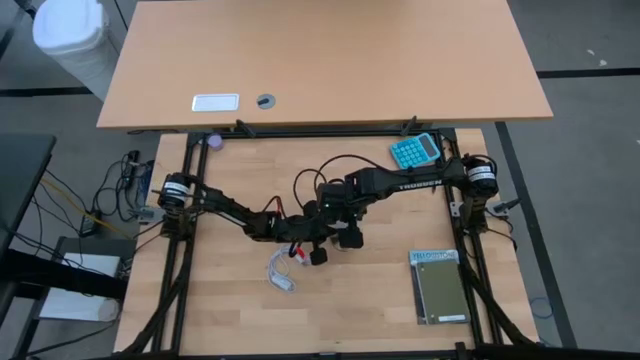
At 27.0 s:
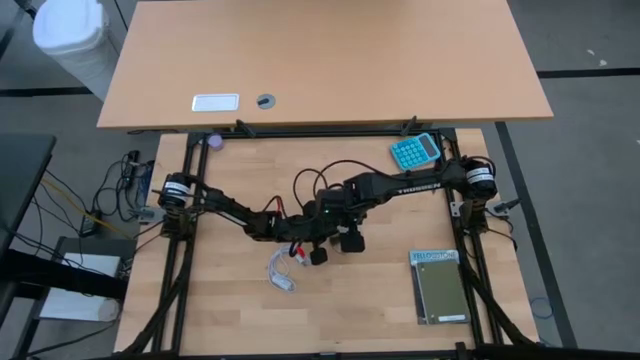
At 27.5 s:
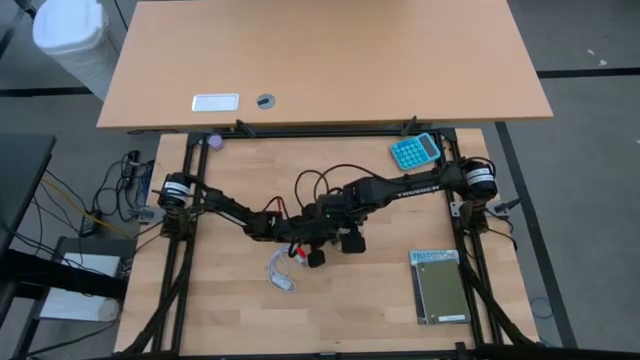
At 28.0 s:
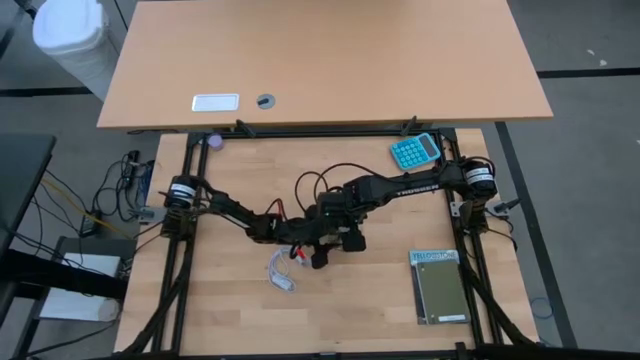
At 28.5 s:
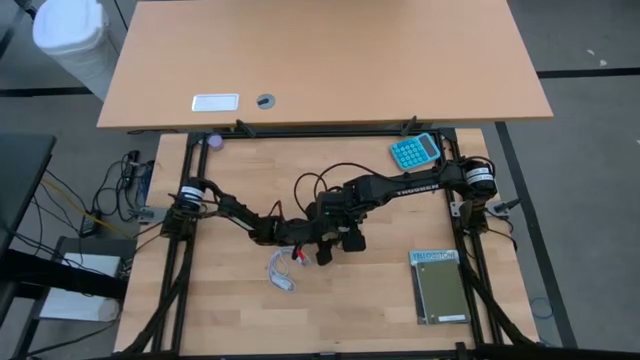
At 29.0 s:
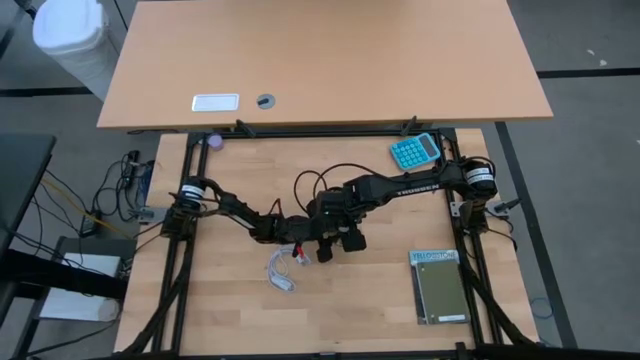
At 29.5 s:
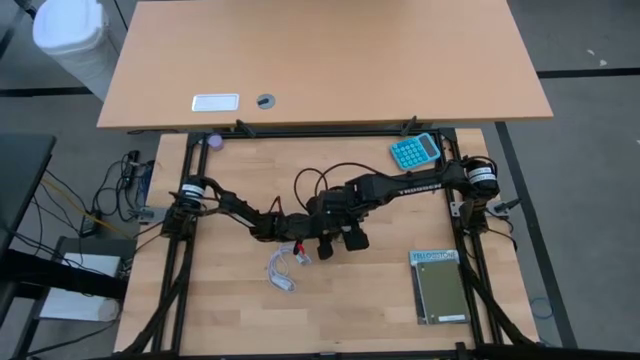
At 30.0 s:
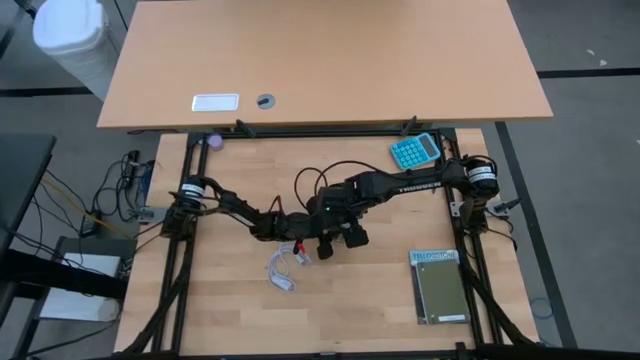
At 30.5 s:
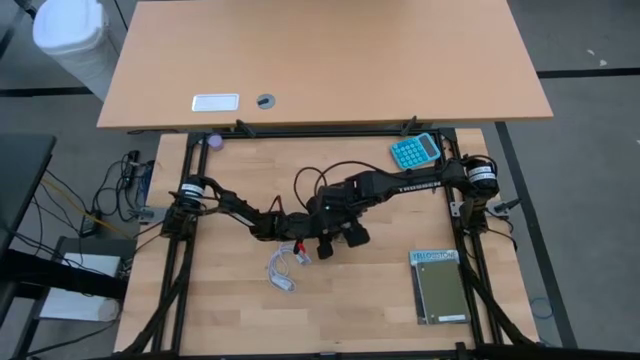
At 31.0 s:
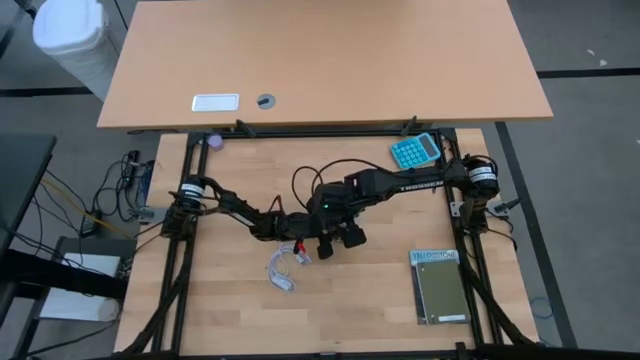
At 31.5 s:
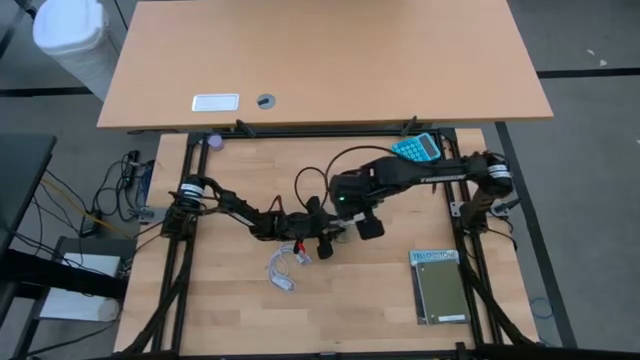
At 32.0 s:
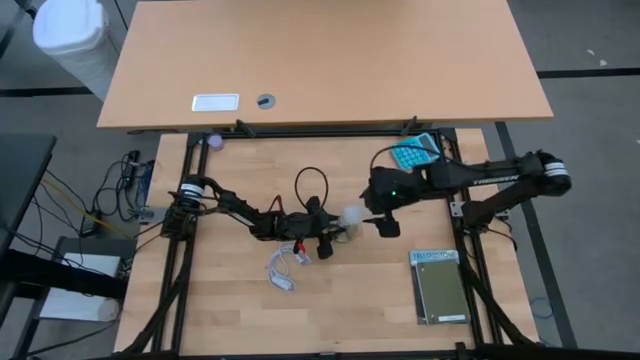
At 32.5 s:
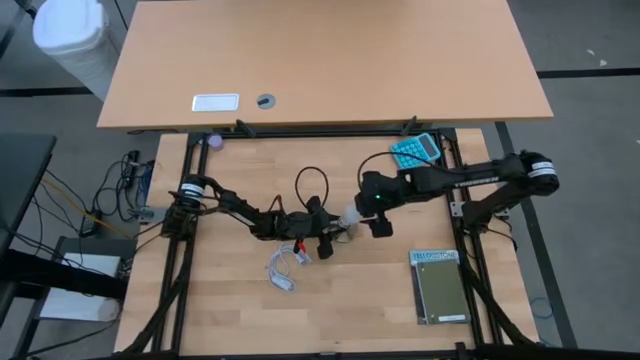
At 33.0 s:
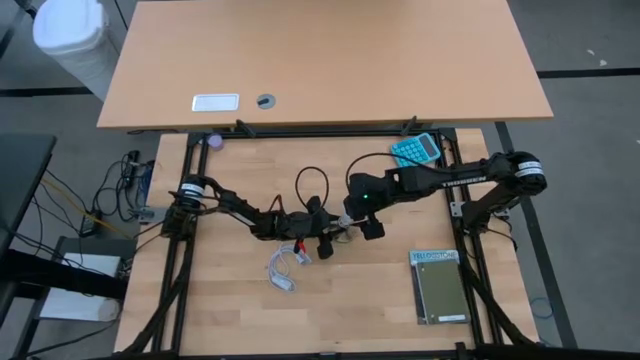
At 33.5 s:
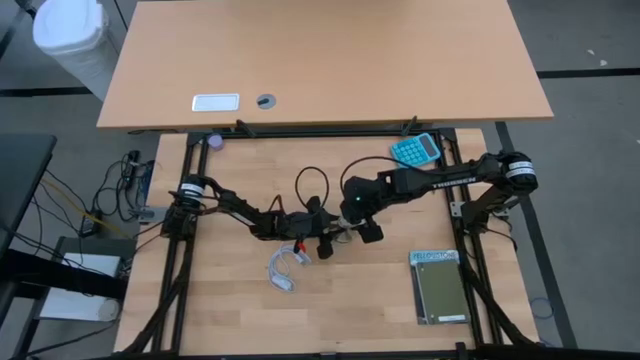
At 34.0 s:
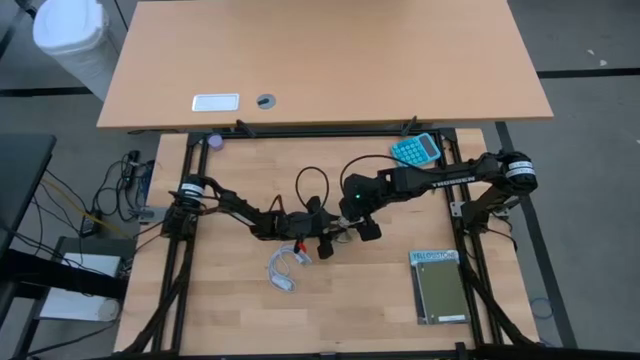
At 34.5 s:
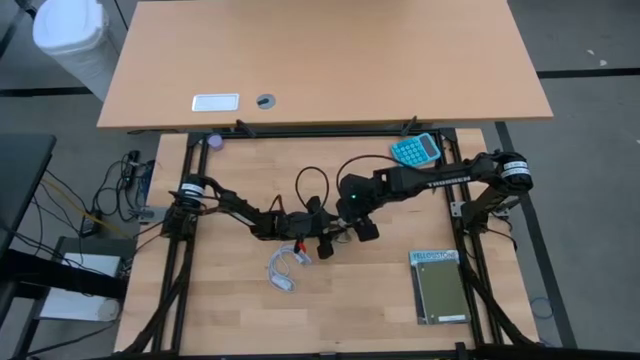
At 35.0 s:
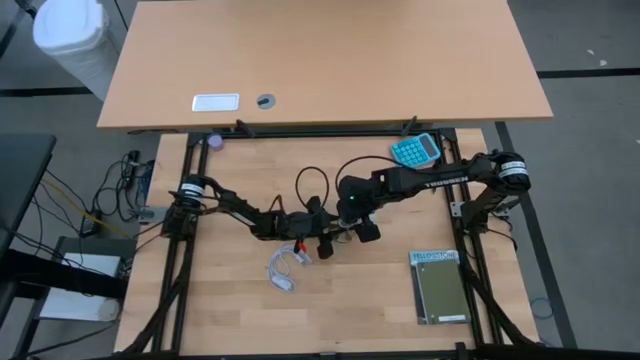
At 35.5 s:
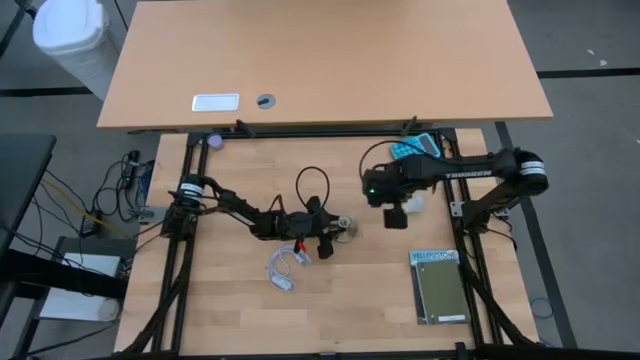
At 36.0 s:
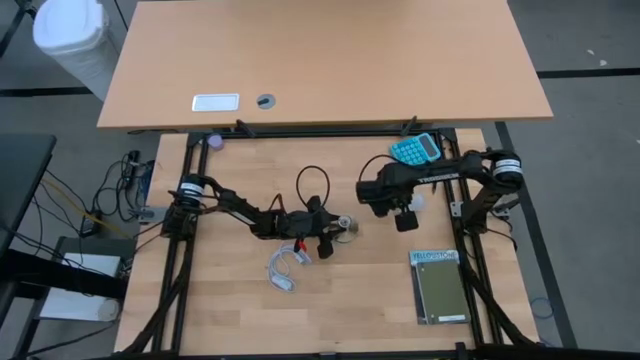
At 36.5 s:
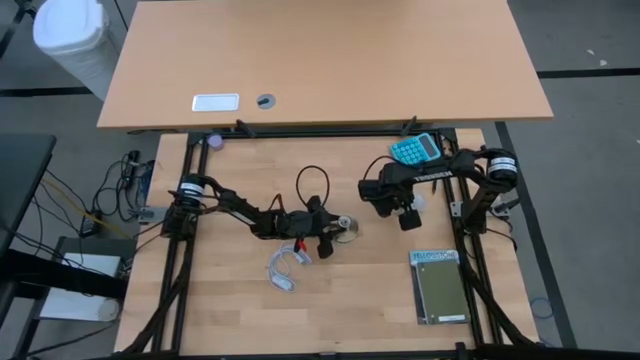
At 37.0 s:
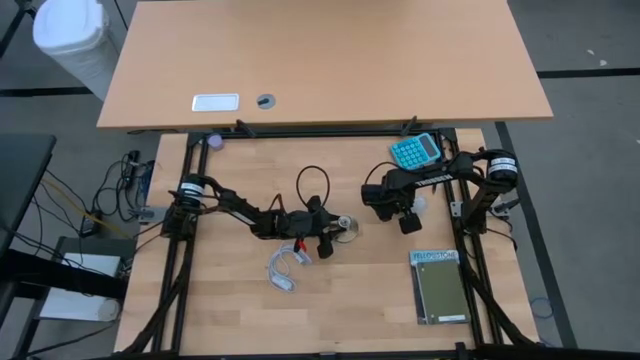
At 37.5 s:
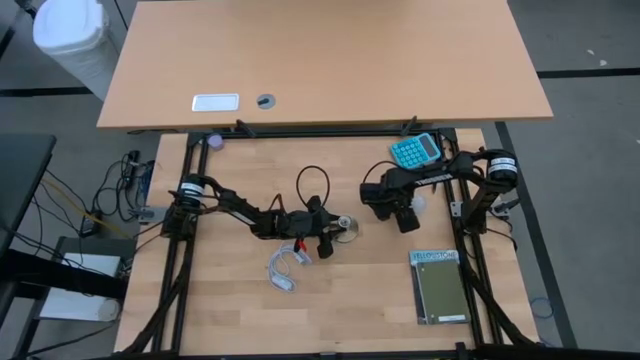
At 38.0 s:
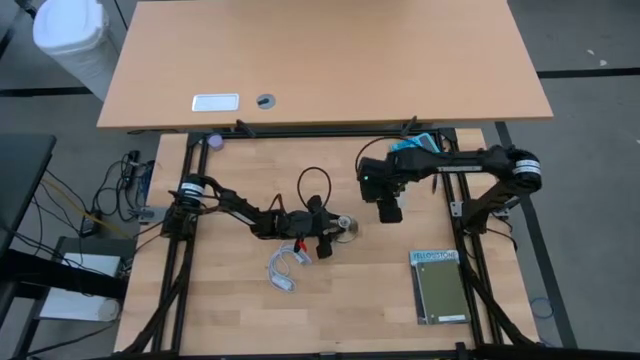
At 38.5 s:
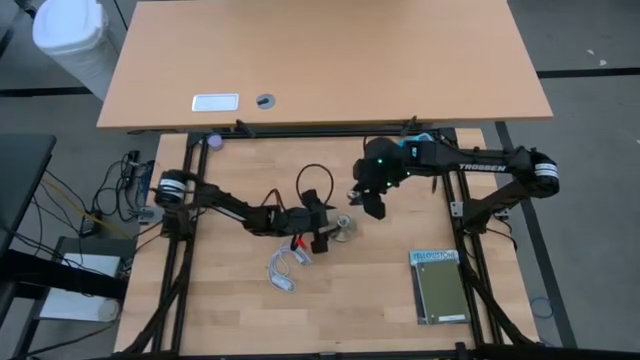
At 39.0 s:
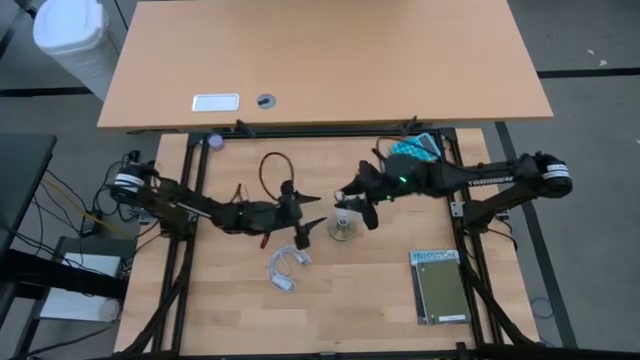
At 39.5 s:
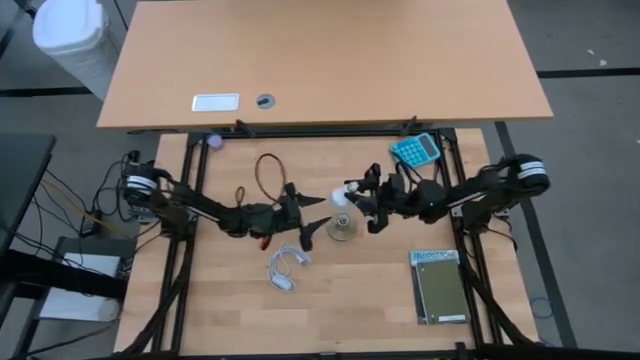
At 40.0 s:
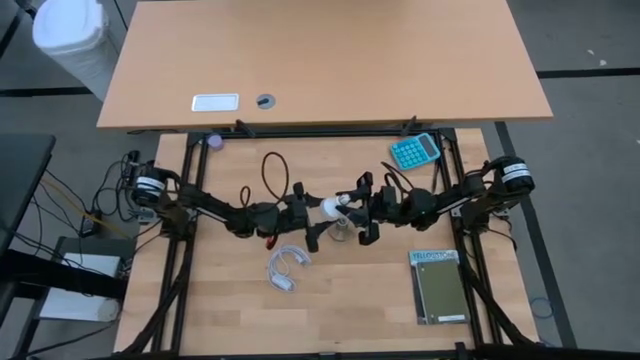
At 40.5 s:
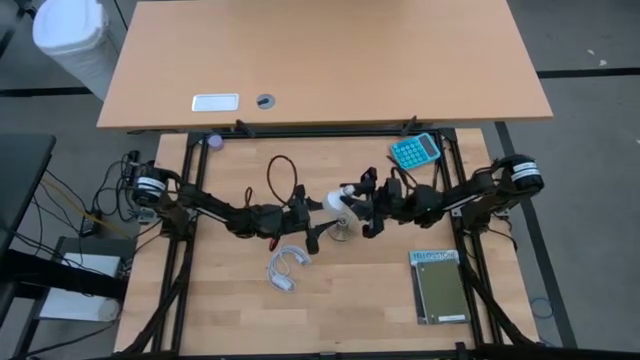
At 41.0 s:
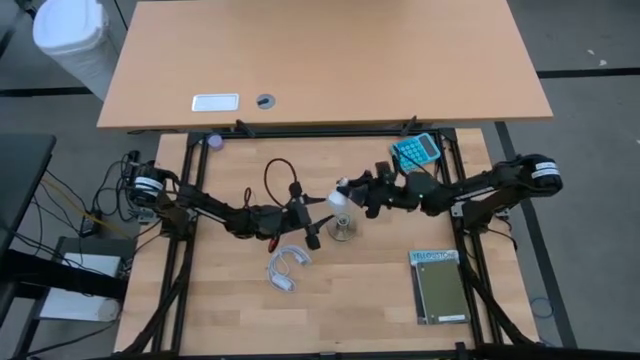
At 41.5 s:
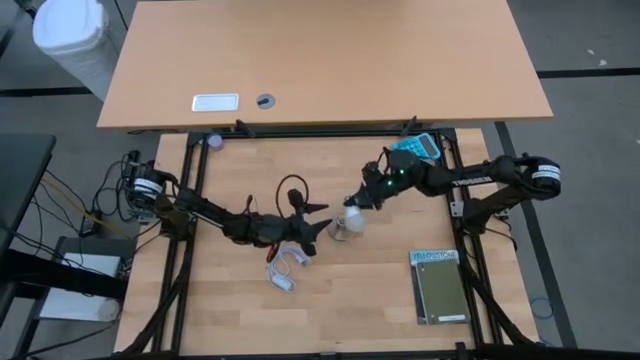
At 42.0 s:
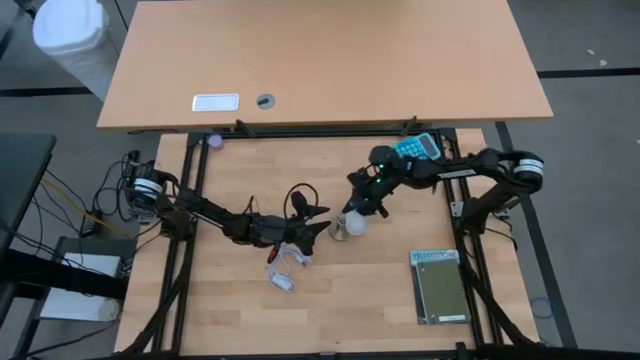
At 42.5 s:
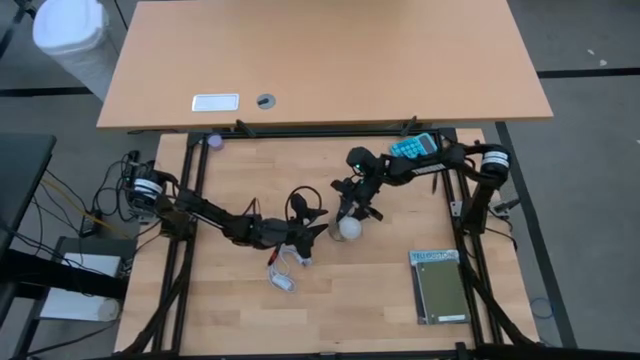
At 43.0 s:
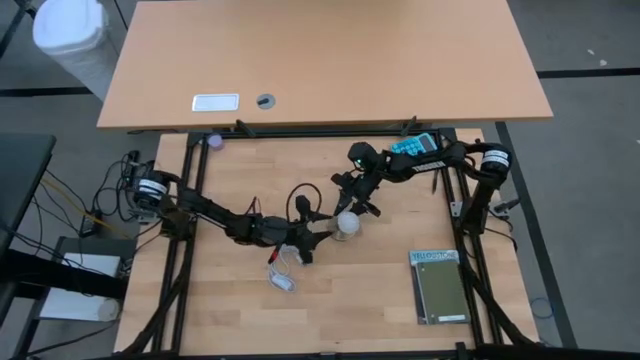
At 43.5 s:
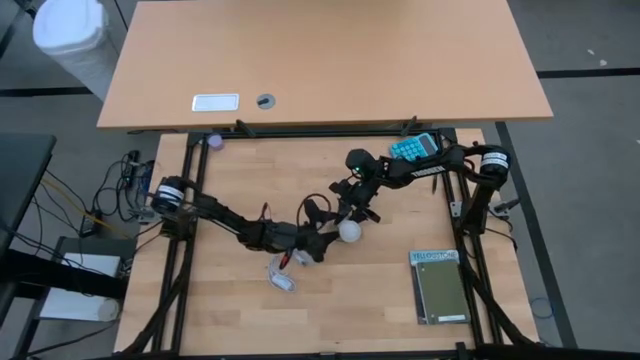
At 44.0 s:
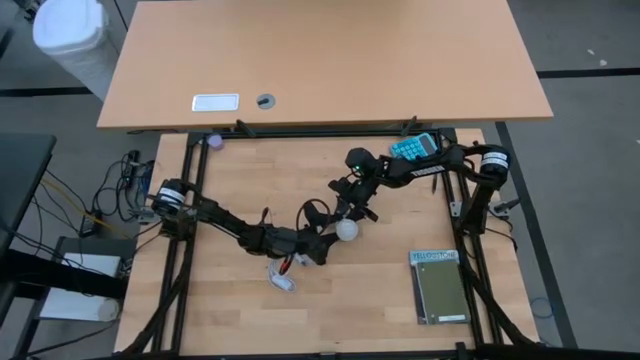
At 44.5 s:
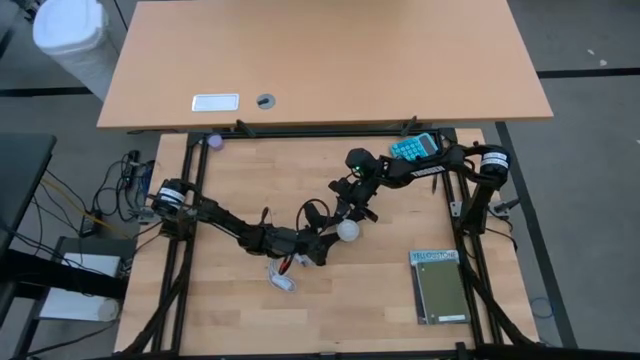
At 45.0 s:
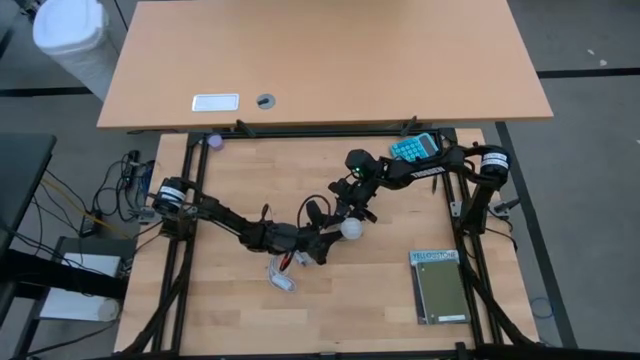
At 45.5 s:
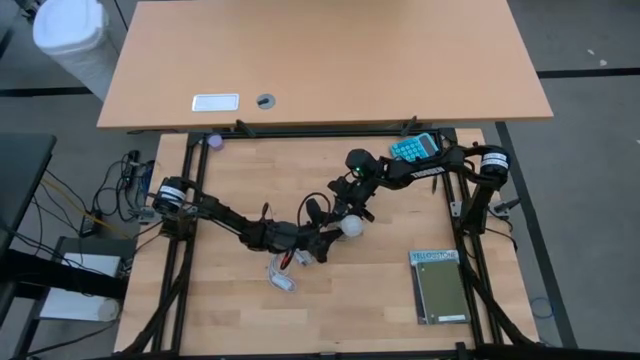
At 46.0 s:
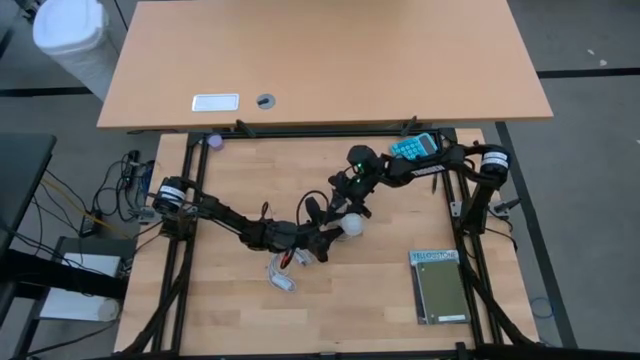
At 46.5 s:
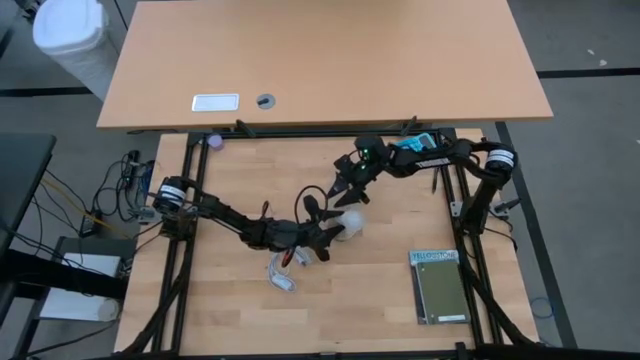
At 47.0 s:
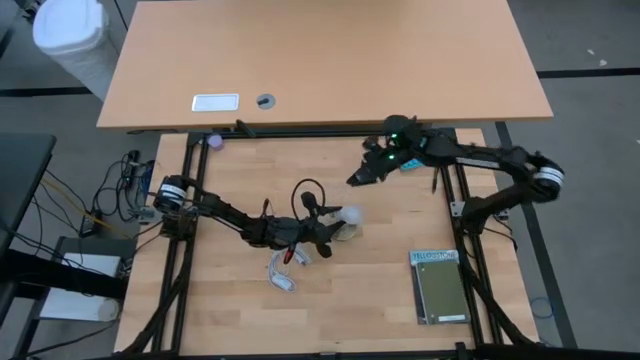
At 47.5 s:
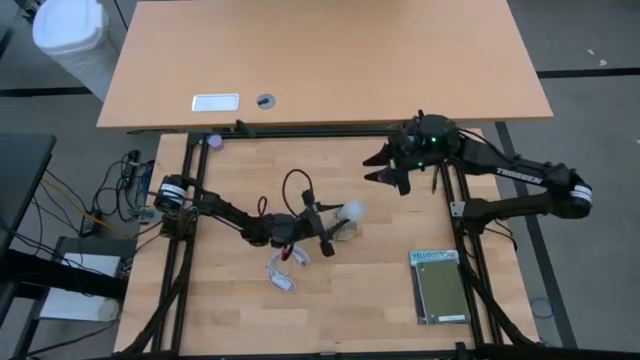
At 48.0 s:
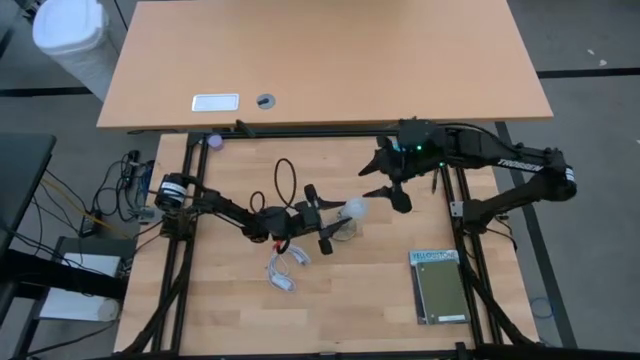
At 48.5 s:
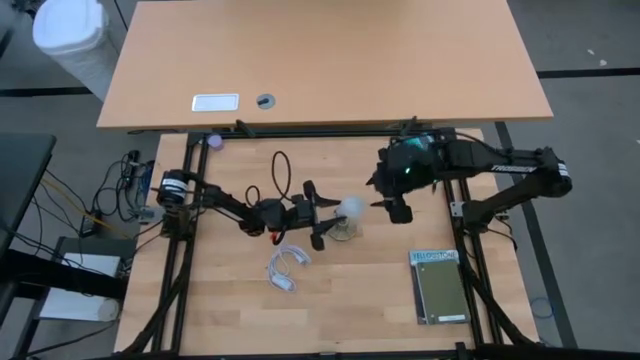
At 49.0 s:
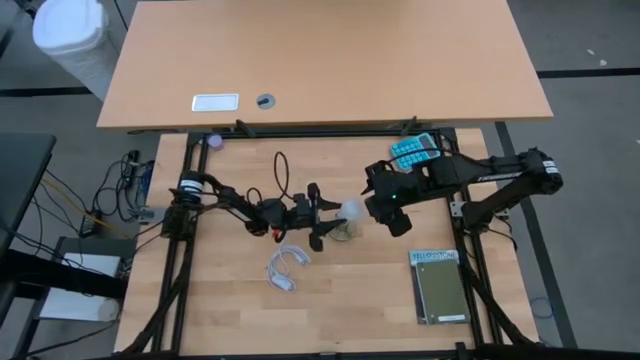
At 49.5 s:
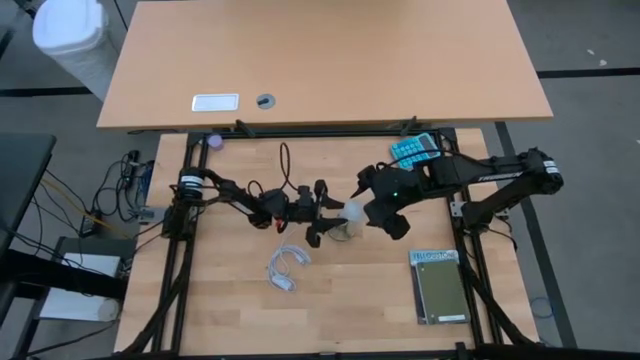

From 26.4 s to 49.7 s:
Task: Screw lightbulb
Insert the lightbulb into the socket
